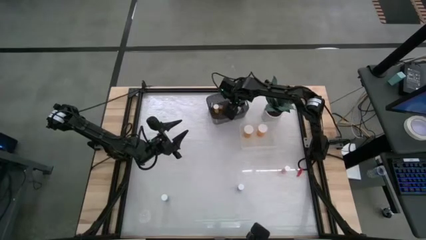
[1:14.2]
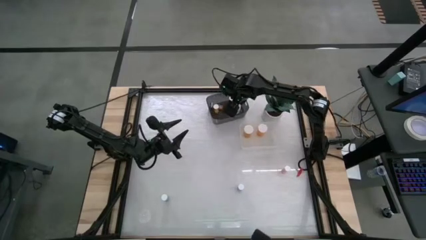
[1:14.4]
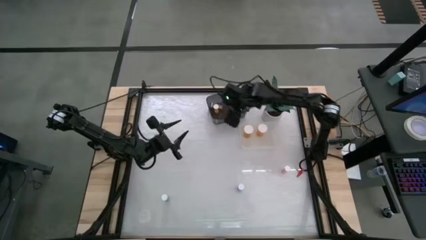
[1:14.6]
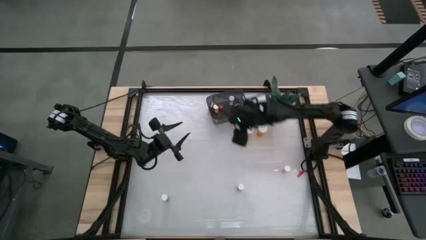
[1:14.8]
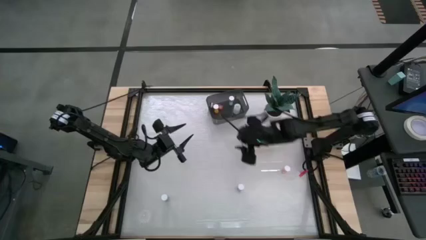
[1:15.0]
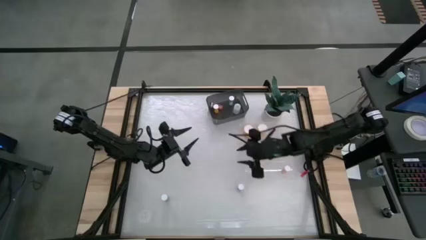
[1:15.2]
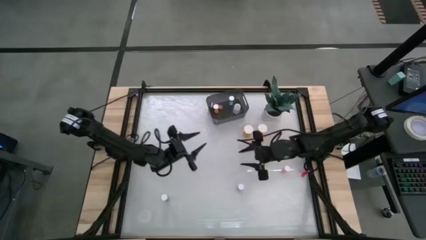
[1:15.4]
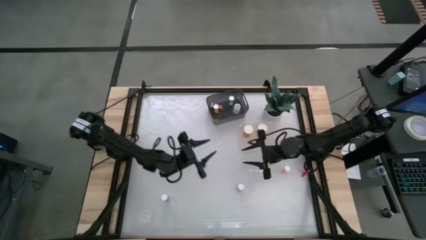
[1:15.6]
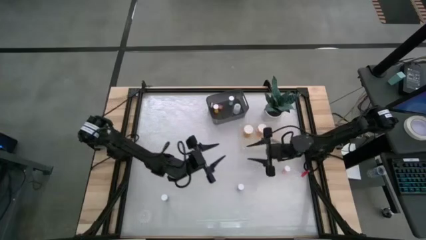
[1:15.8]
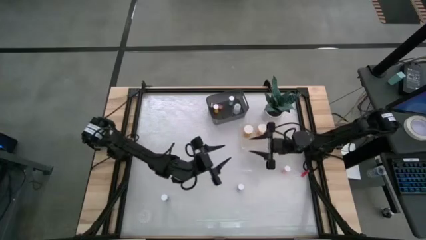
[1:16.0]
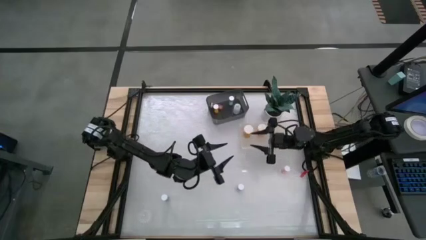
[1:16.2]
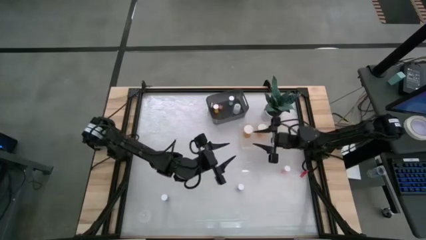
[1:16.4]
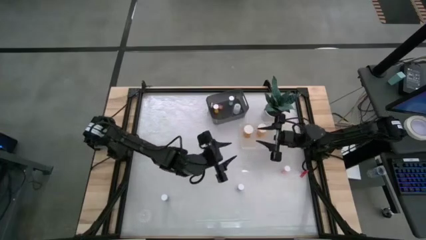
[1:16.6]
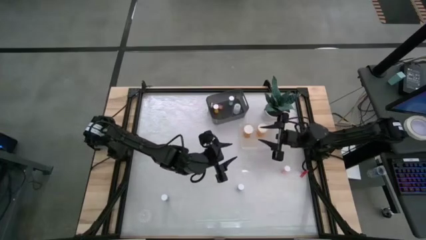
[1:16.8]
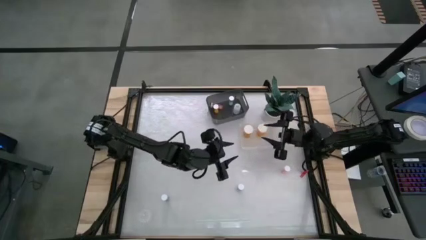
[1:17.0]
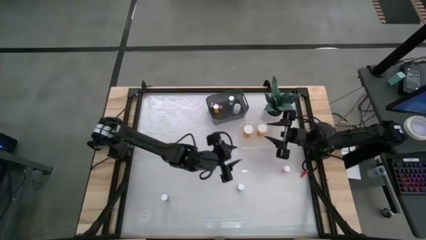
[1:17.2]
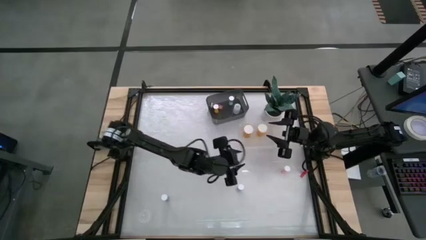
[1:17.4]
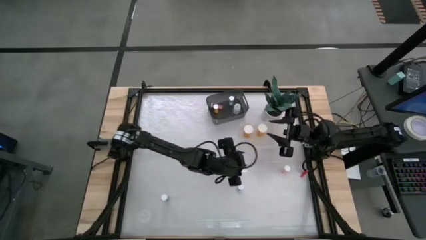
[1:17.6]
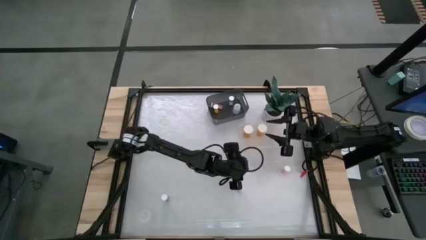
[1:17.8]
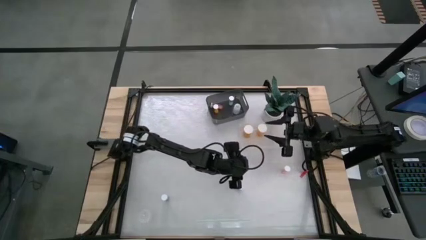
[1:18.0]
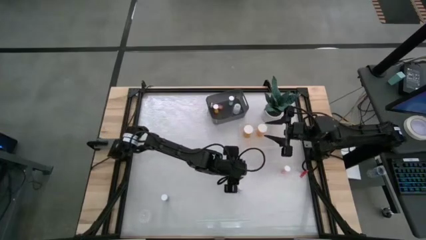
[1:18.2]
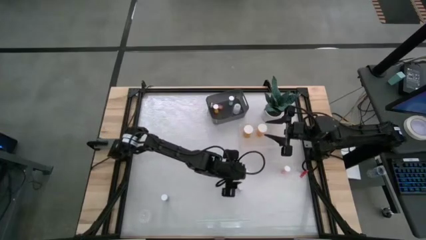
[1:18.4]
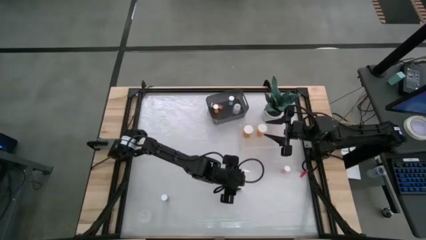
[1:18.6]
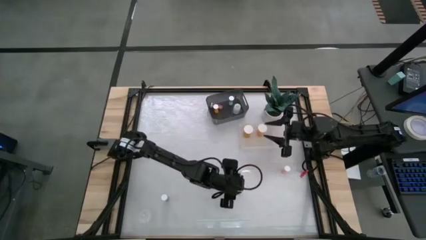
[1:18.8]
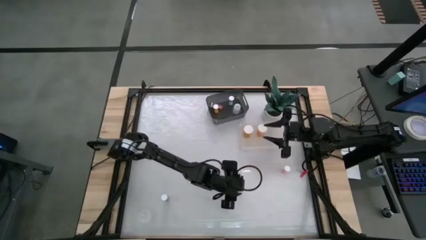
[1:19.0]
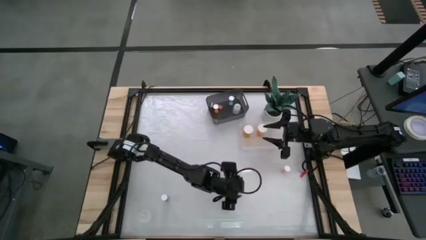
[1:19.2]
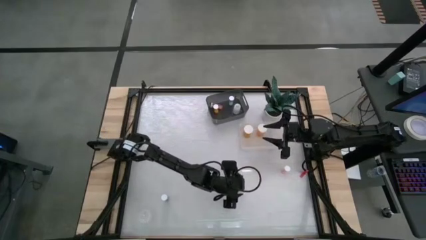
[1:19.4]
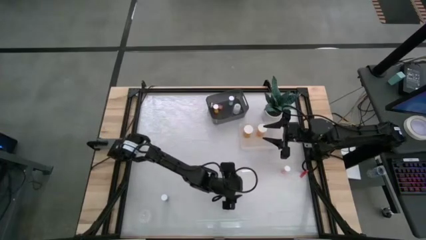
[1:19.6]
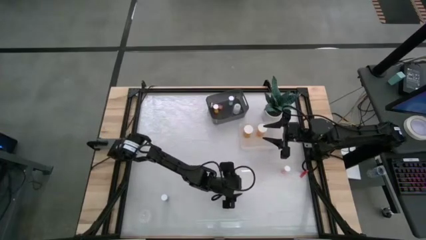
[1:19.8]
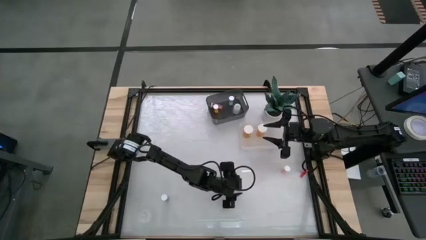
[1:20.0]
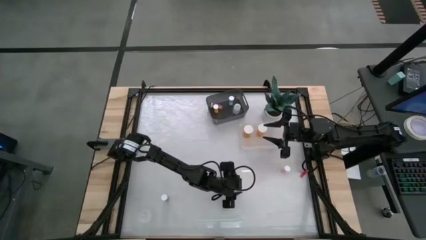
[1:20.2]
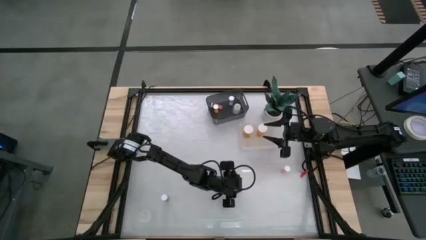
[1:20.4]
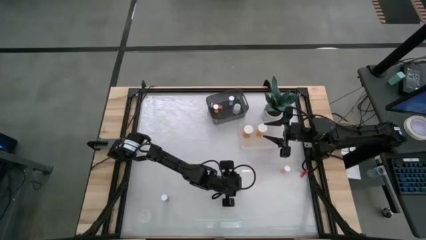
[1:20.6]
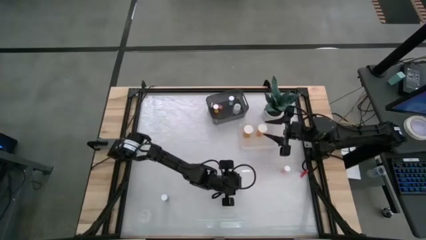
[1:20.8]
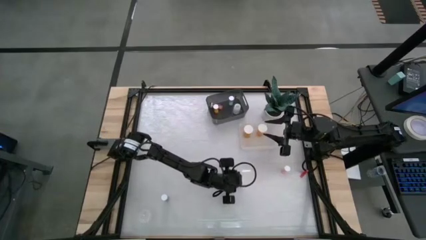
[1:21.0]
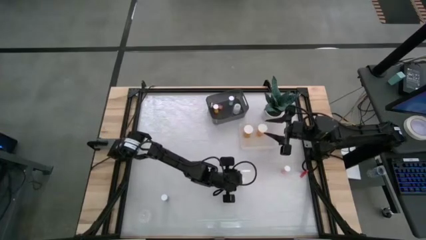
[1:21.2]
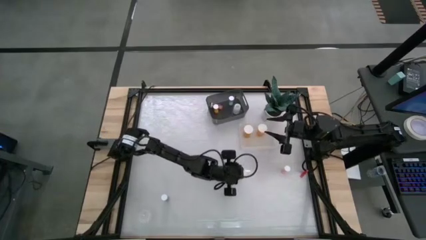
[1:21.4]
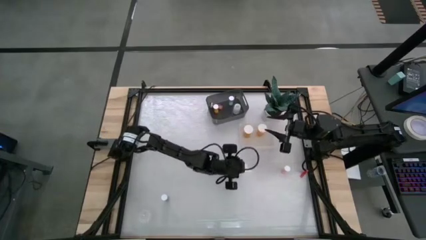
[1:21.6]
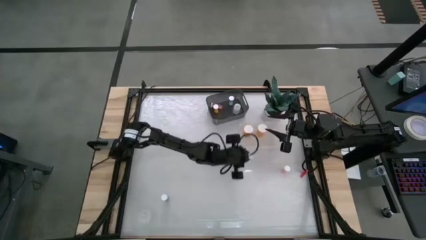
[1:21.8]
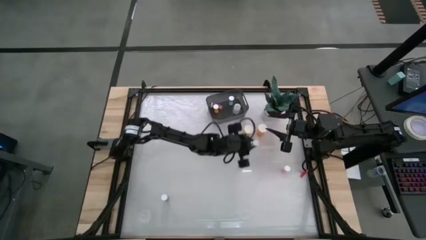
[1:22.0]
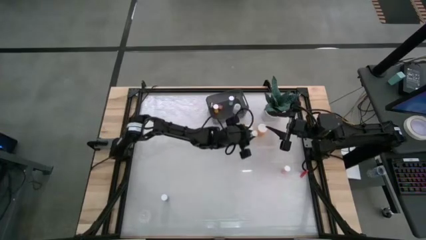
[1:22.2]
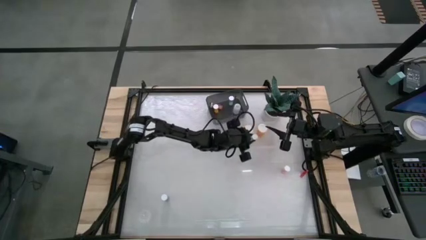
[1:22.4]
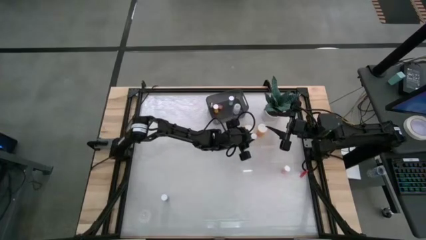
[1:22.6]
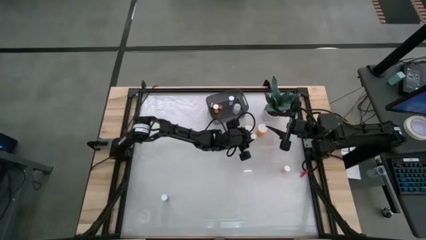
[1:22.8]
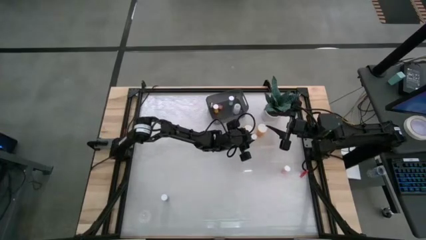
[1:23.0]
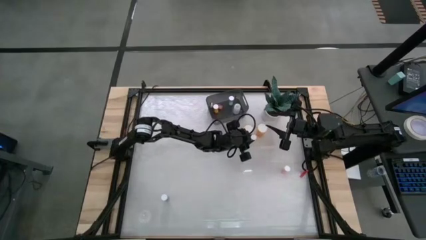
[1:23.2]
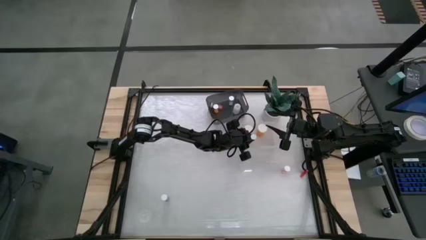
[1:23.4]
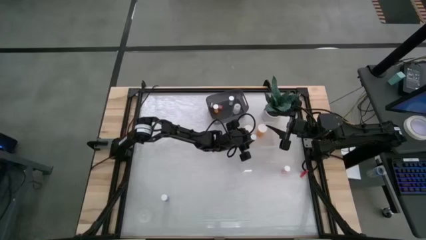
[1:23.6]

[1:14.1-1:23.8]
Task: Pick and place medicine bottles into bin by pill shape (circle, oval)
Put the right small blue pill bottle into the transparent bin

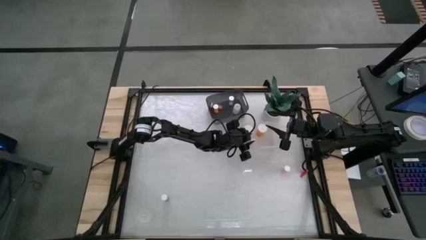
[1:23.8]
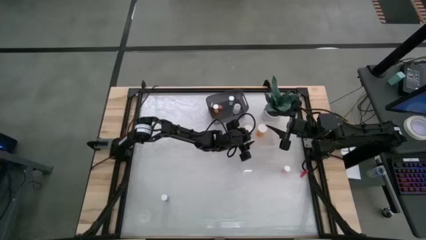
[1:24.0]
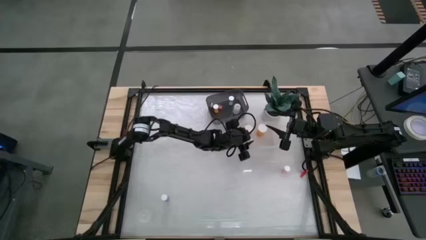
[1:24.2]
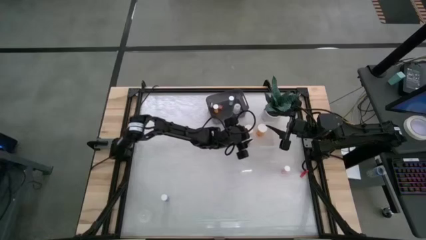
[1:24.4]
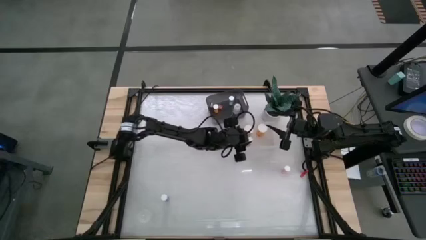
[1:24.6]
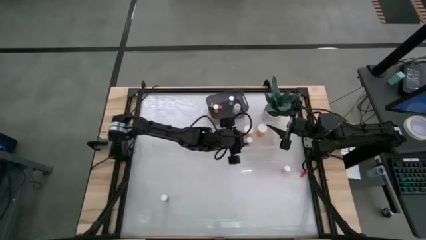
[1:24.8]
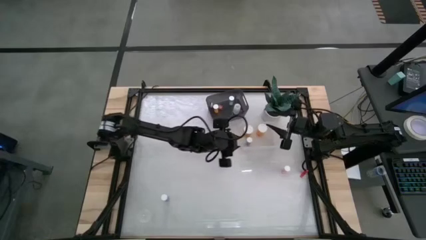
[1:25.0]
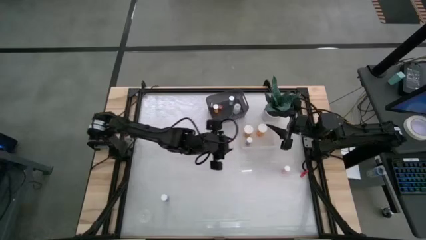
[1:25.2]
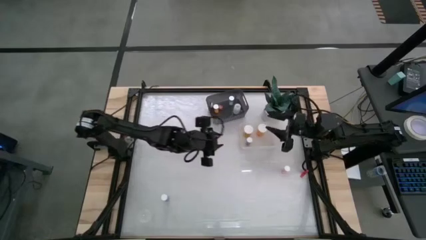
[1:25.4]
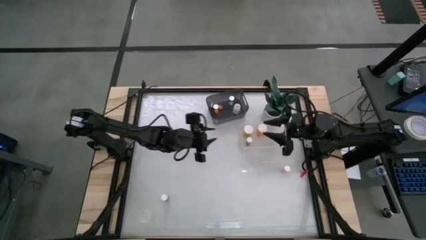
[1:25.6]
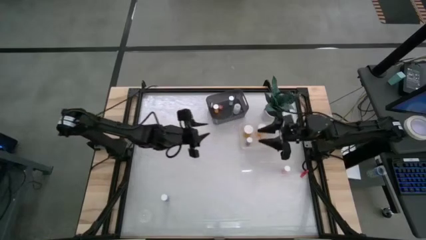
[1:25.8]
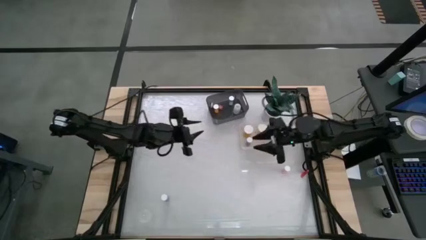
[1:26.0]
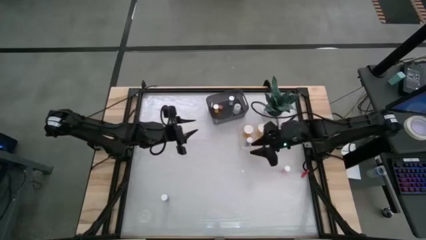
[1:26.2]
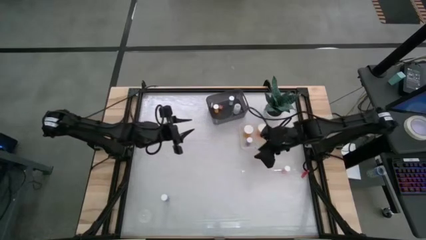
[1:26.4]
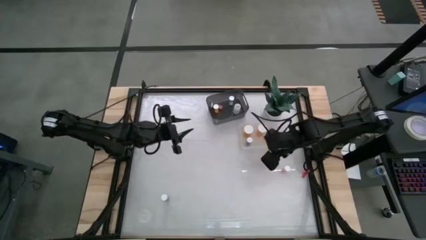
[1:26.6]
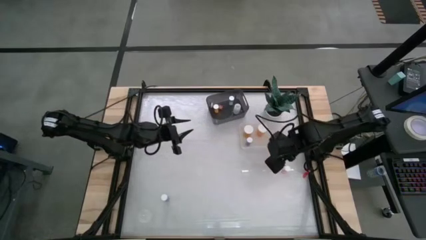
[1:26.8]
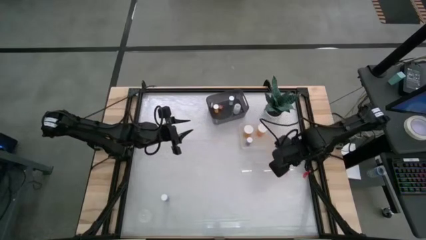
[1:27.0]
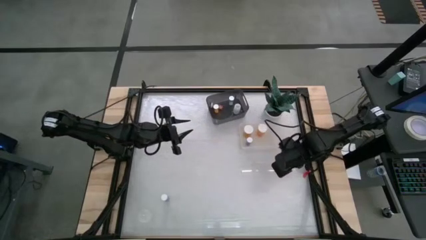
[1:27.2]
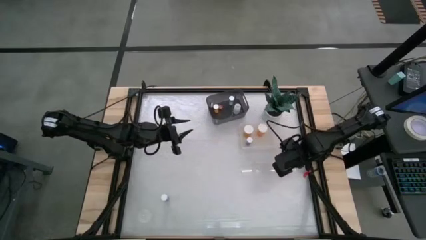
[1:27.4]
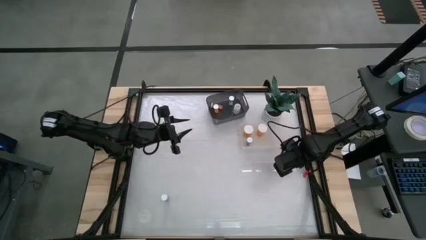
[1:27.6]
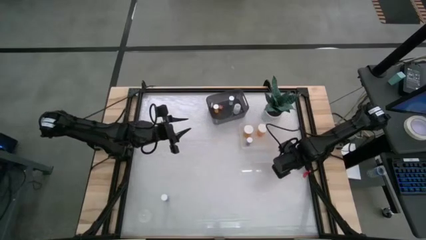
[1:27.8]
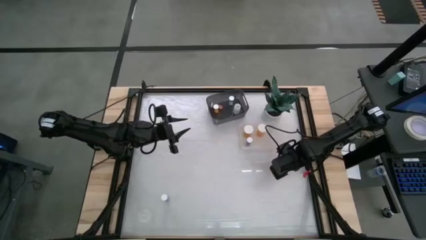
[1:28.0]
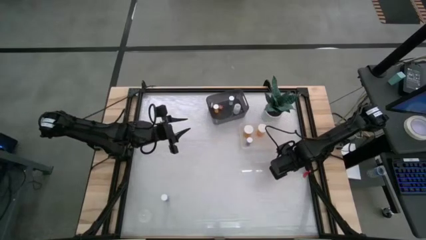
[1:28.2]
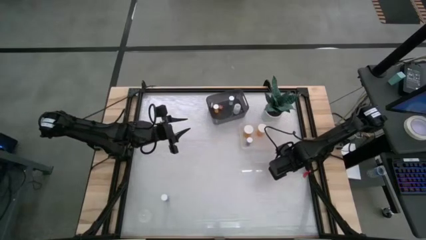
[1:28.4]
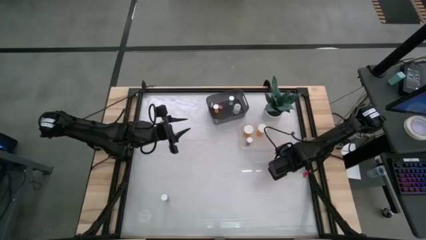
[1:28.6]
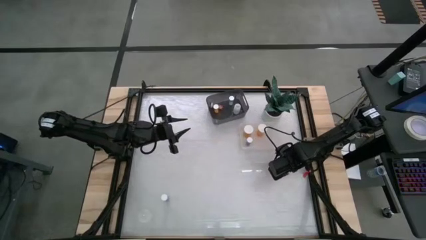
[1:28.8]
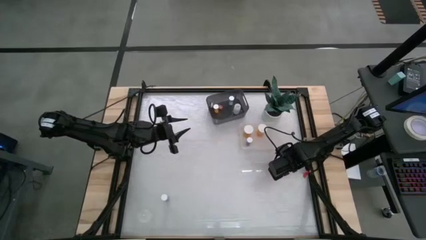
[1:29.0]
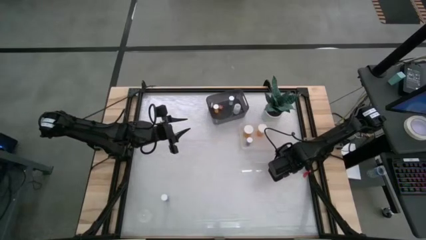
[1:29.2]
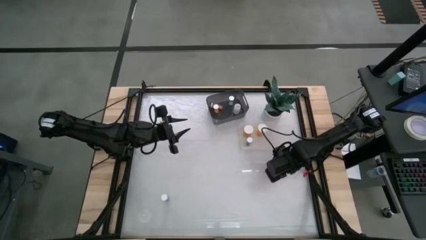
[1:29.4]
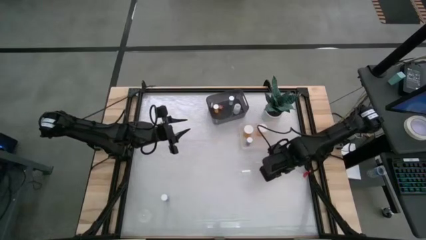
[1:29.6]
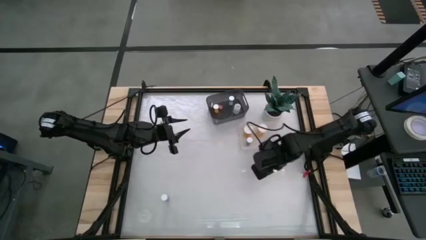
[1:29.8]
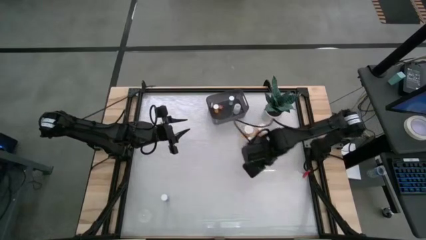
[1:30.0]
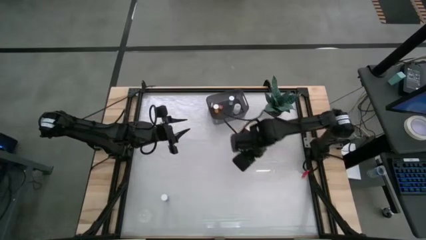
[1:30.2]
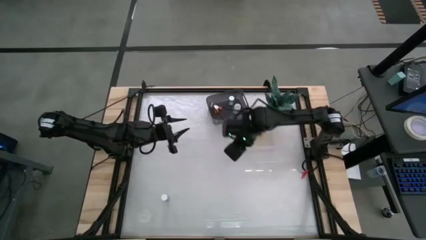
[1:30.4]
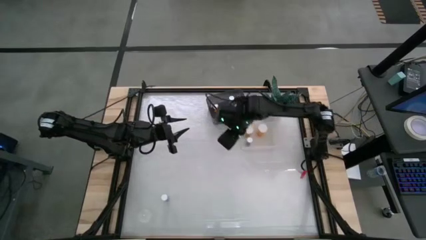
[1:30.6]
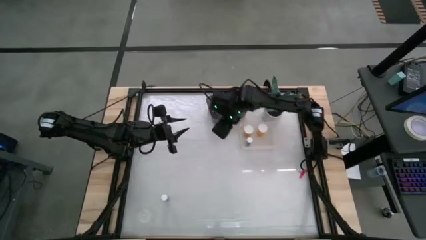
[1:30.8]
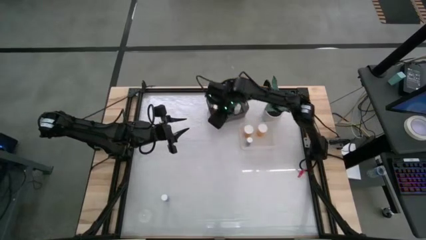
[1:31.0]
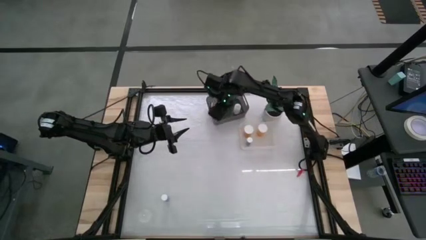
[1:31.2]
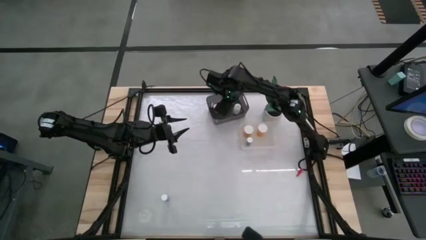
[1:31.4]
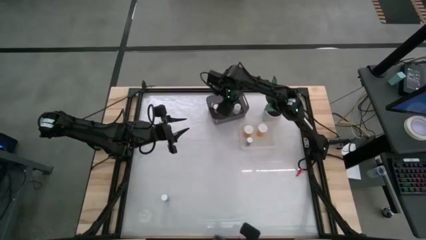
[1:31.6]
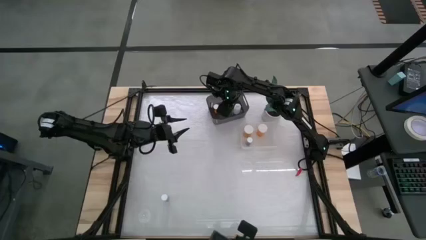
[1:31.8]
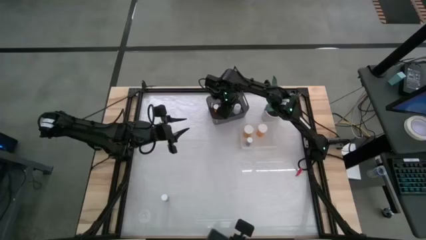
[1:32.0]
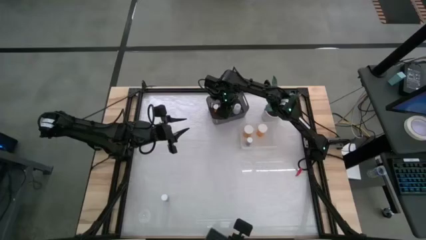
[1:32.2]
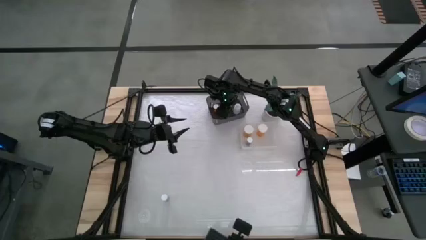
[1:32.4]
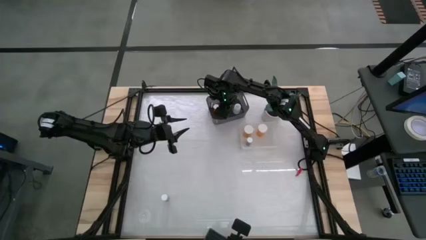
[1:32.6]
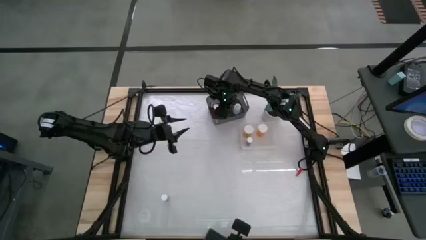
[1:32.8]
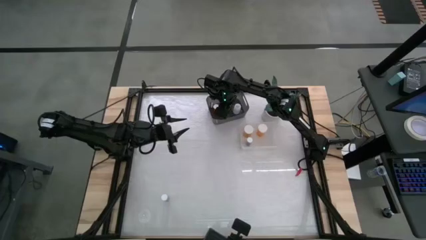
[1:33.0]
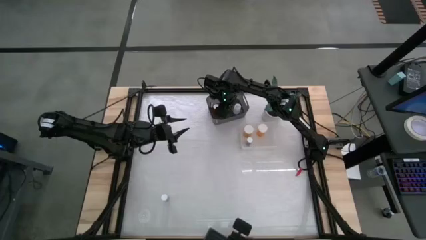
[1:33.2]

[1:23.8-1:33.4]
Put the small pink pill bottle into the black bin
